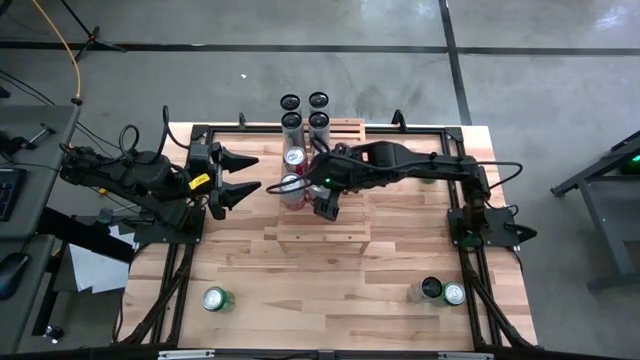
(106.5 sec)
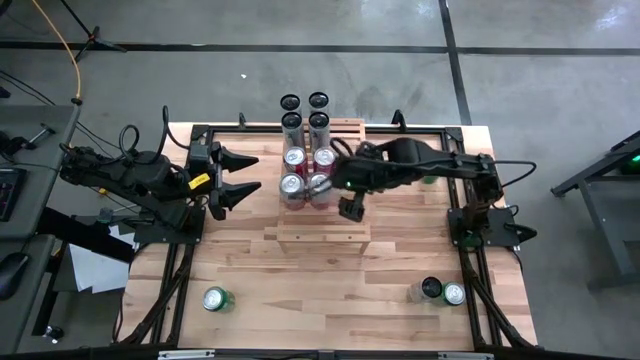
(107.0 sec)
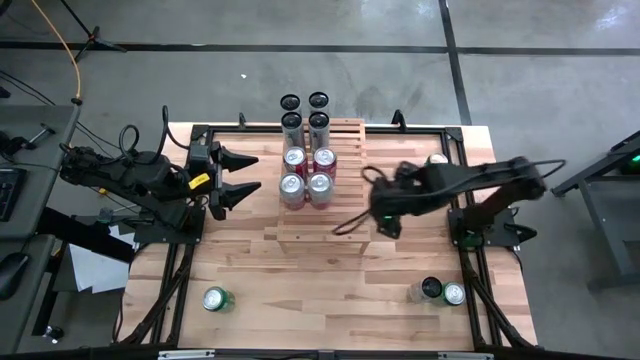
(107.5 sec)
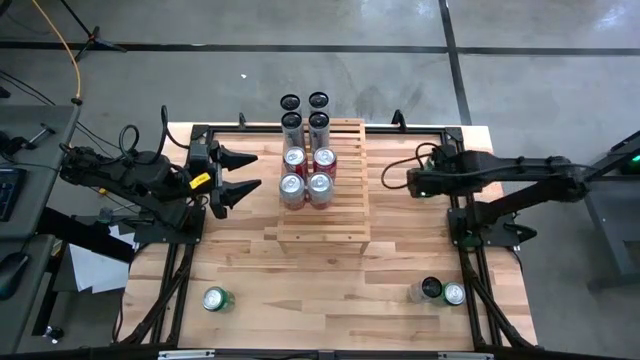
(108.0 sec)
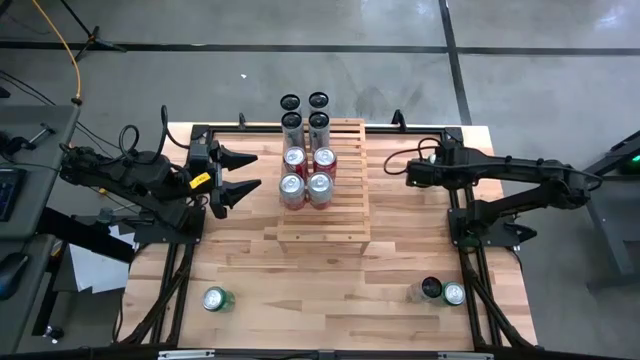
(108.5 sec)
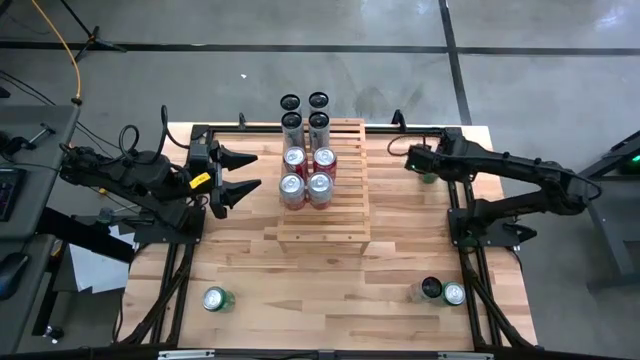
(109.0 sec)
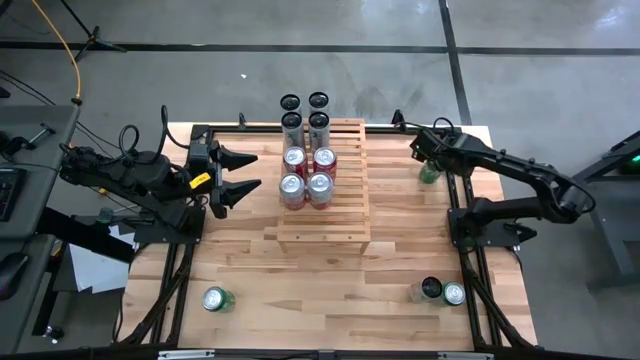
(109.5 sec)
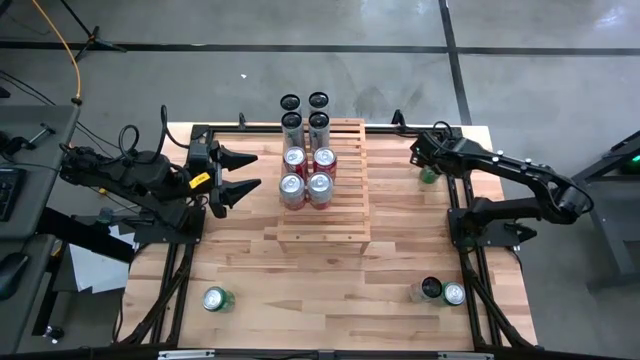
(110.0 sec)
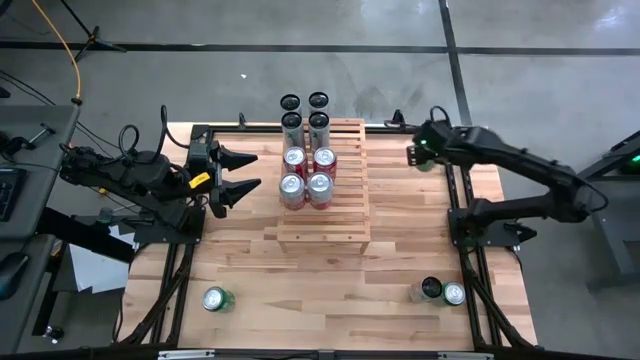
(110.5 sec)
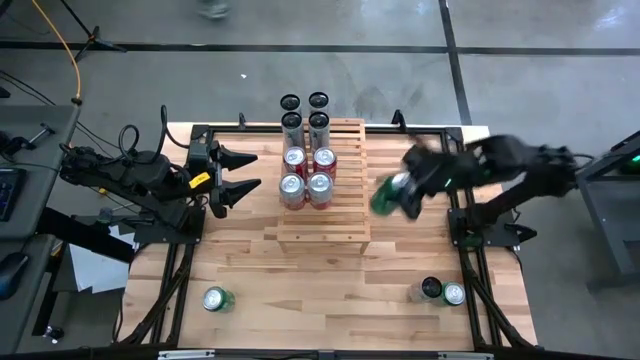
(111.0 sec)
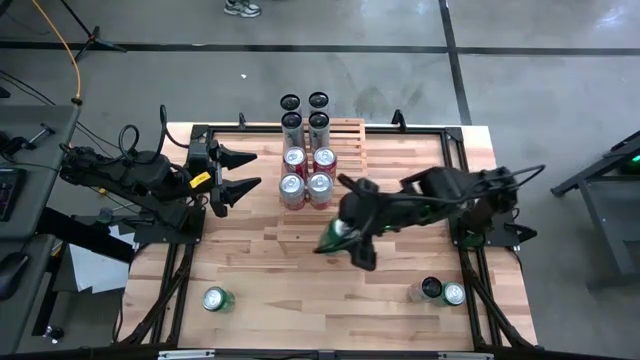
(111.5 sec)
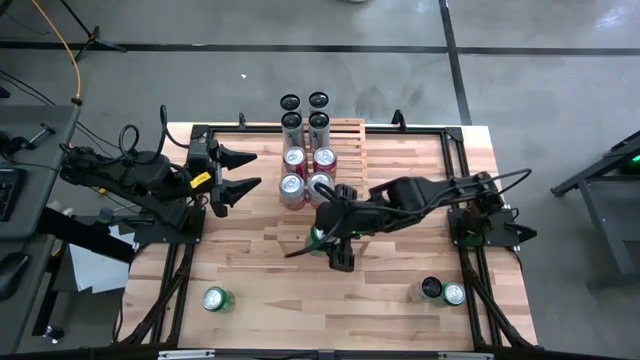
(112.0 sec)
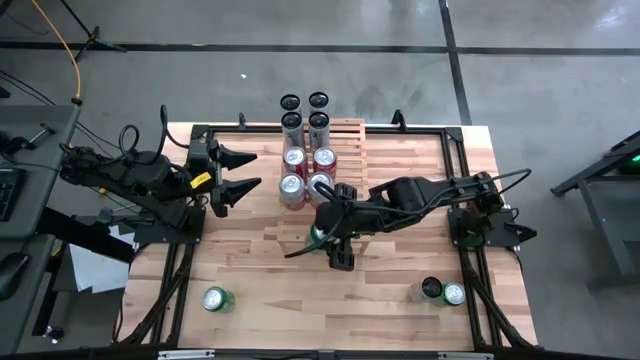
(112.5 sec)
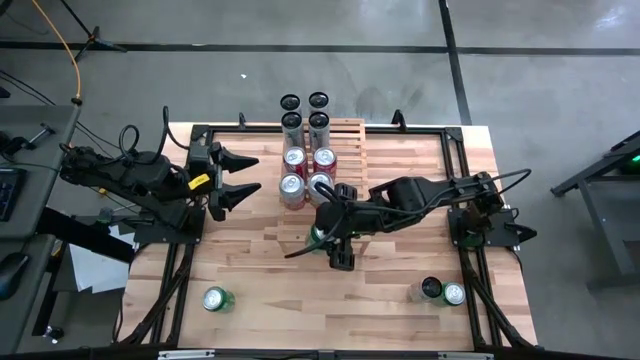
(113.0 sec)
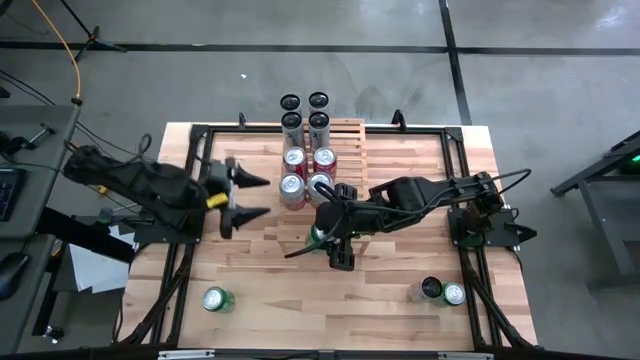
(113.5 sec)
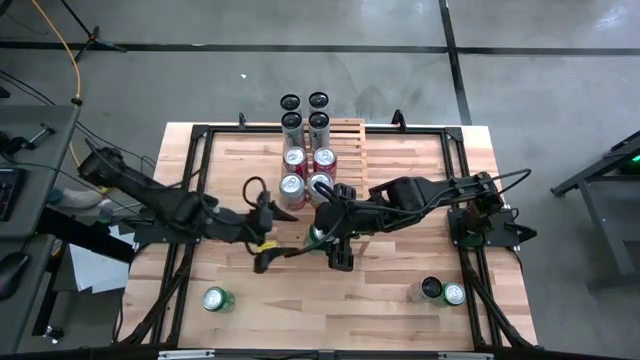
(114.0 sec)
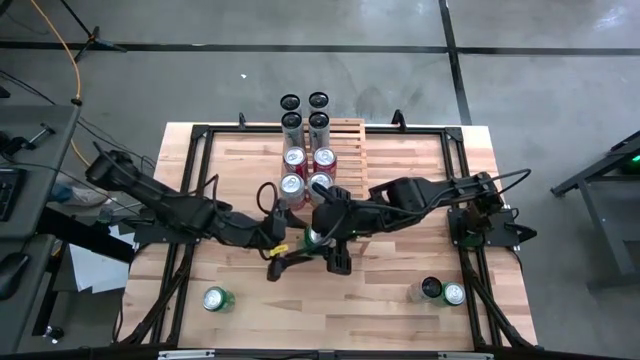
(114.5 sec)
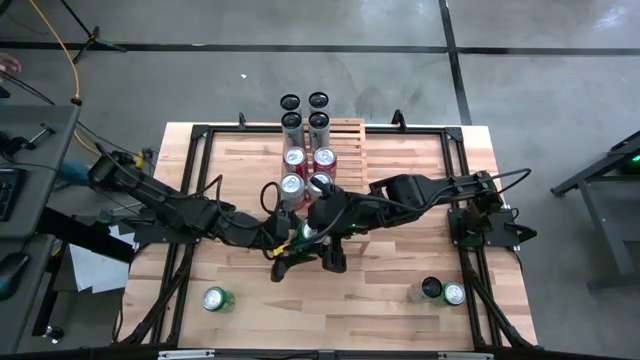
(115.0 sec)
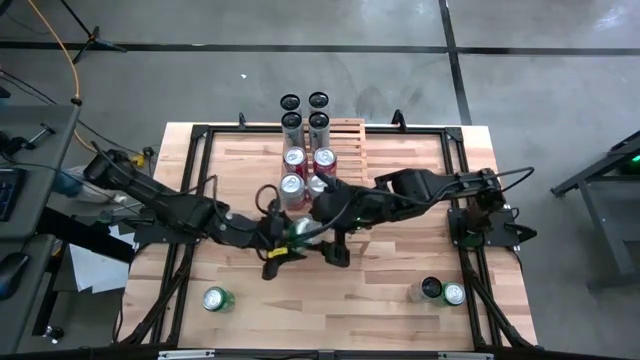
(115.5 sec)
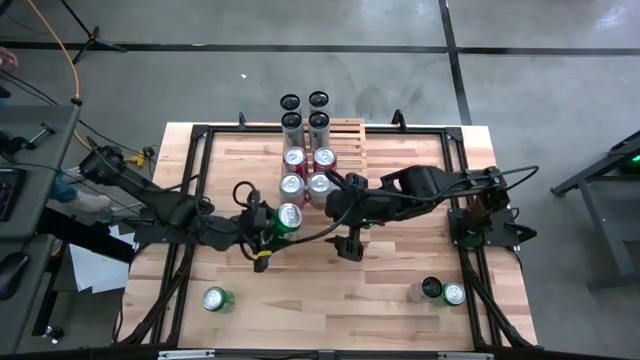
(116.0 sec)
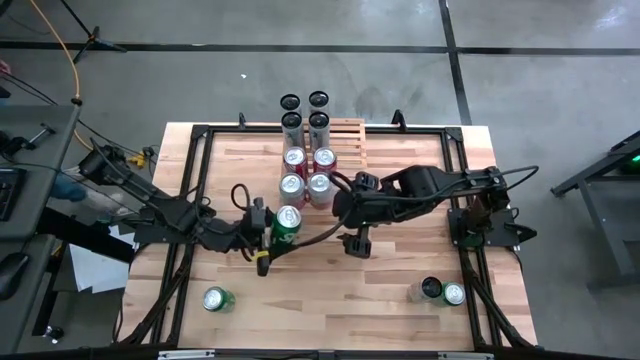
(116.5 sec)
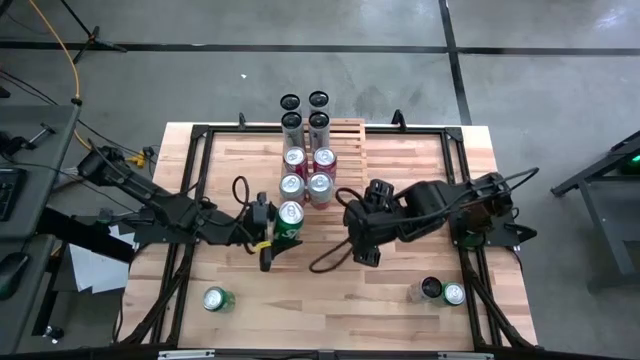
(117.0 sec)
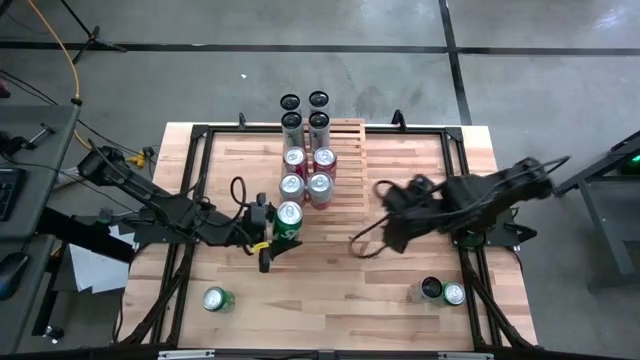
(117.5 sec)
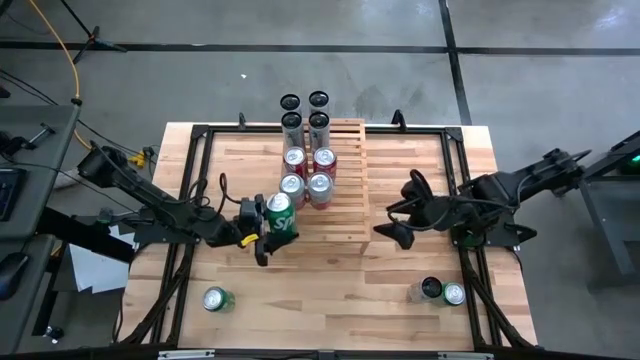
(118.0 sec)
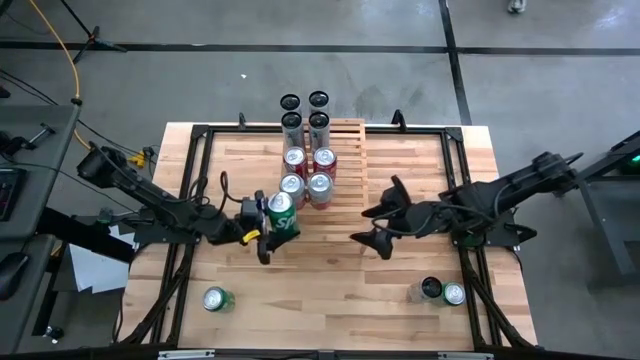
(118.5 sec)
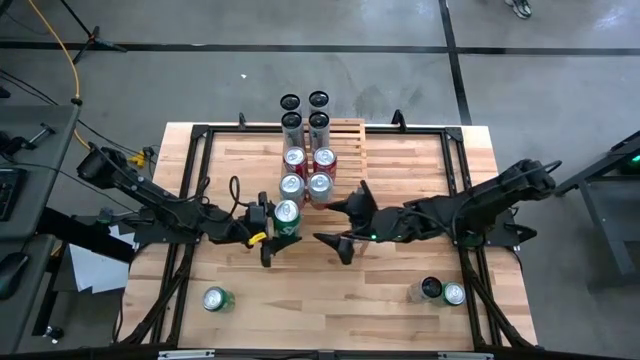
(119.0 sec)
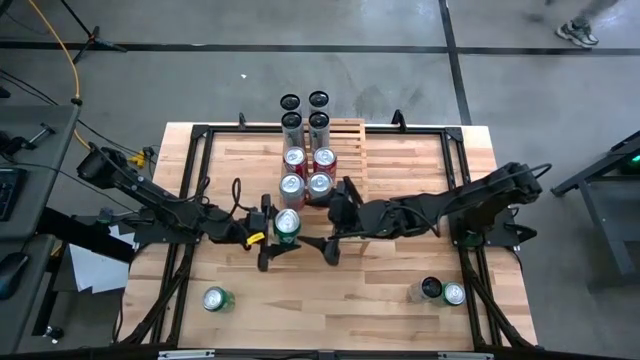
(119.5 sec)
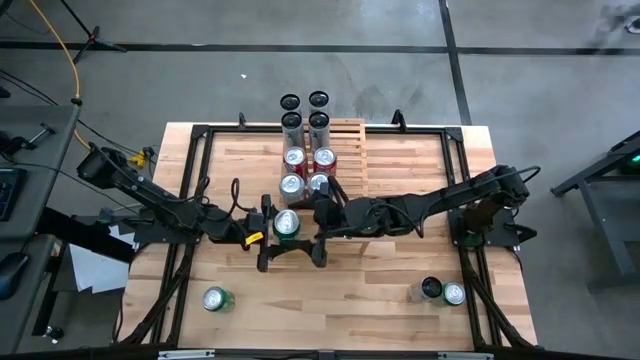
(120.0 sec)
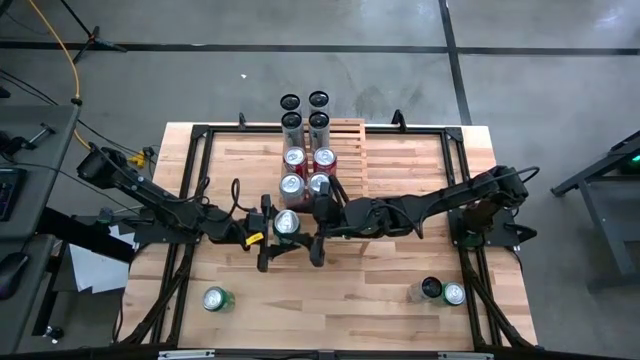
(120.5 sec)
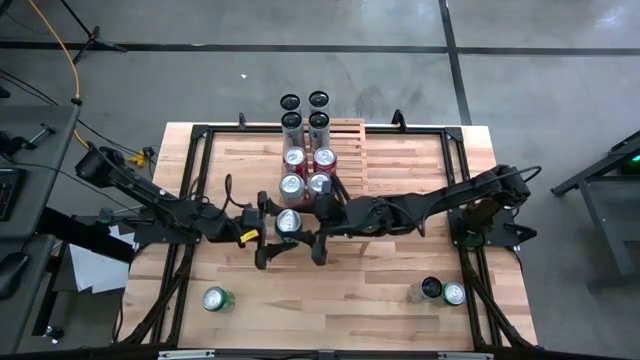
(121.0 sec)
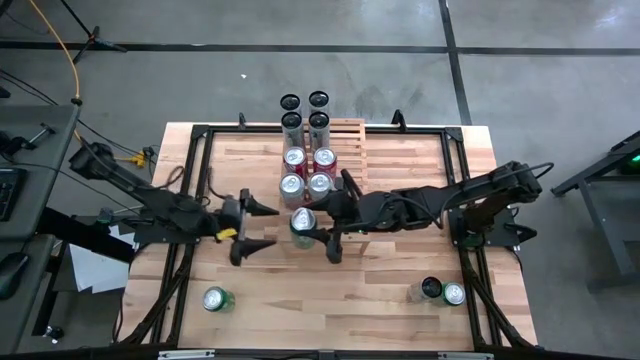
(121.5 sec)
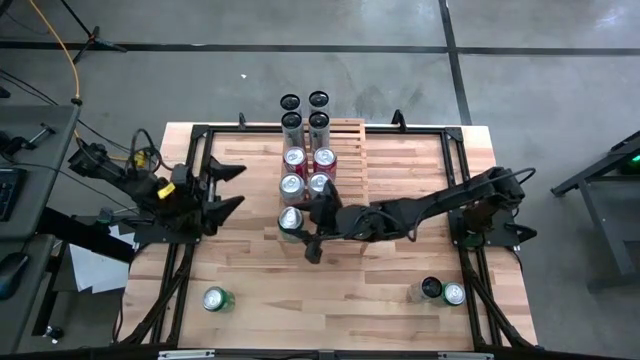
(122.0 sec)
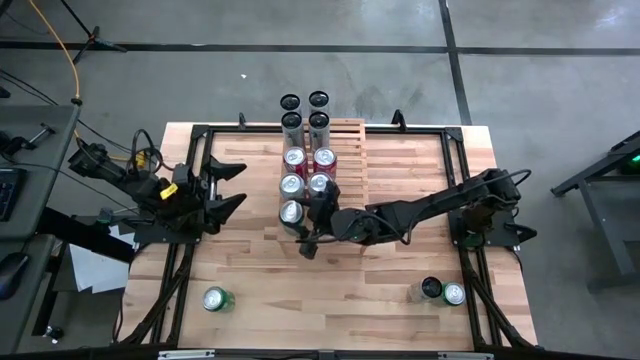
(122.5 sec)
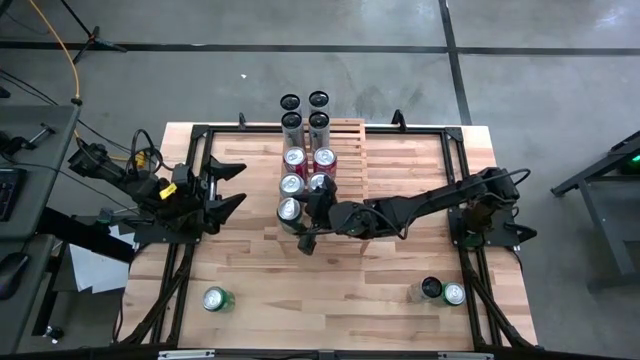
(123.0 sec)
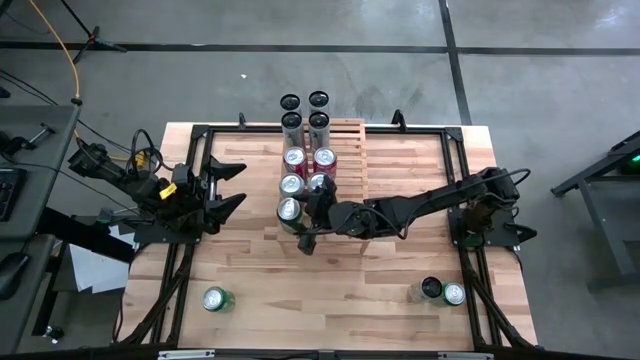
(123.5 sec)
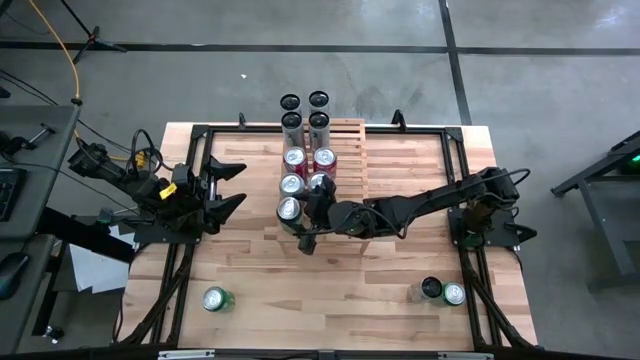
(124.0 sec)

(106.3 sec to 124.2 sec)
Task: Place canned beverage on shelf
Put the top green soda can on the shelf

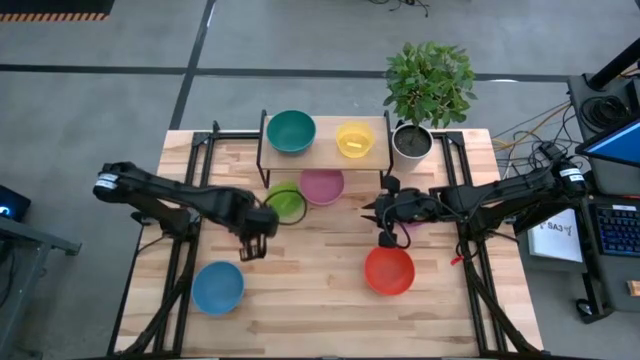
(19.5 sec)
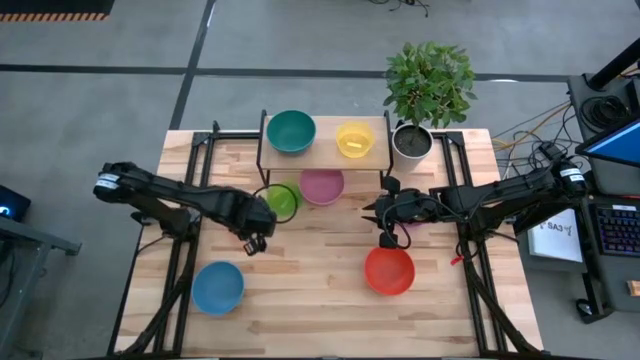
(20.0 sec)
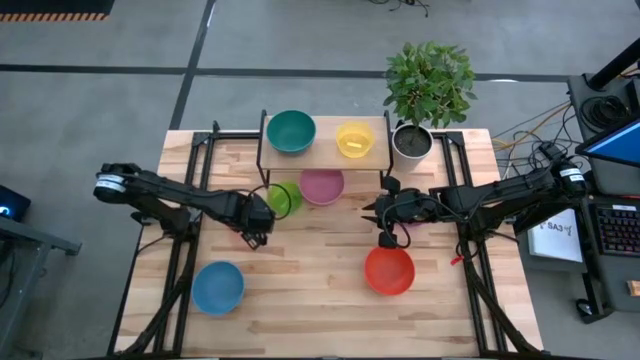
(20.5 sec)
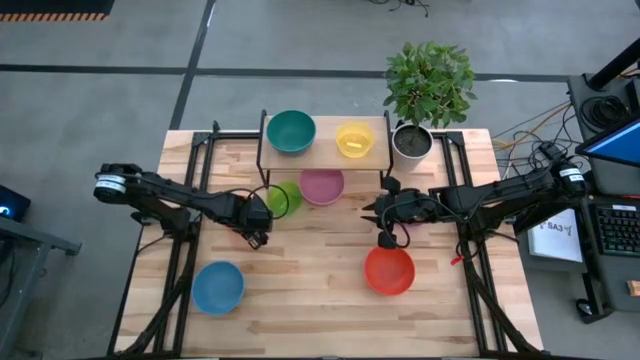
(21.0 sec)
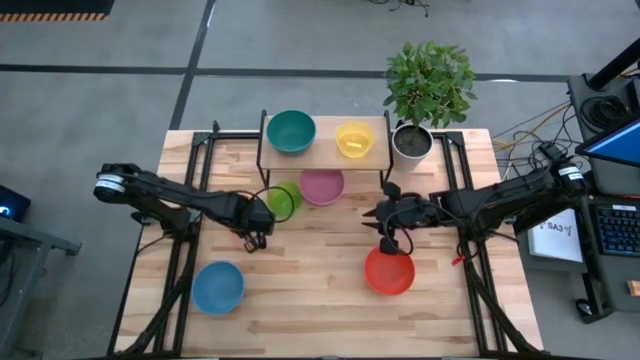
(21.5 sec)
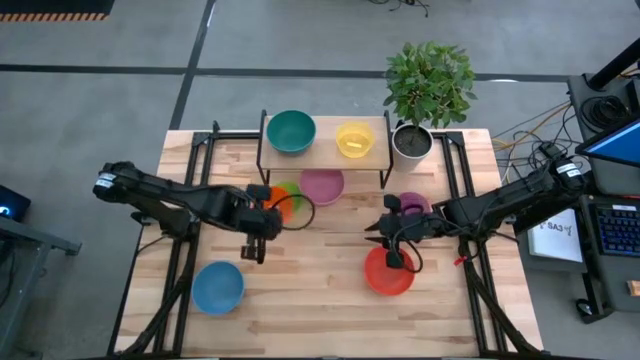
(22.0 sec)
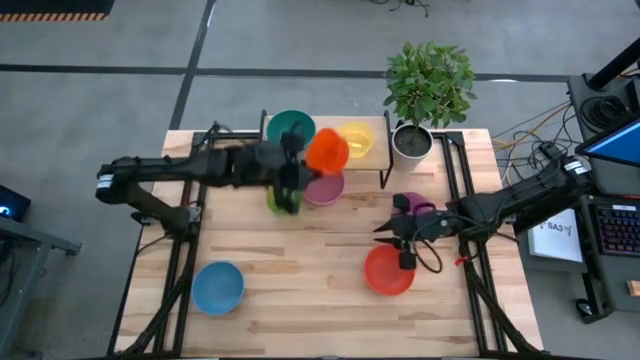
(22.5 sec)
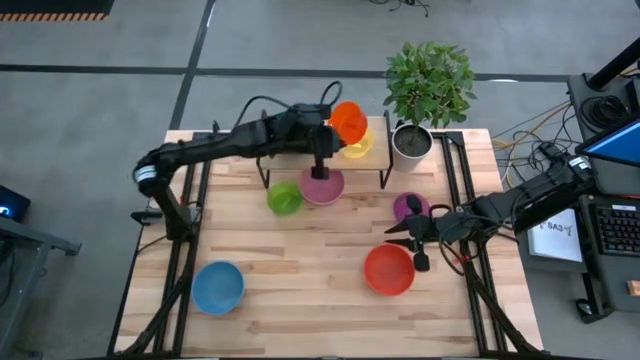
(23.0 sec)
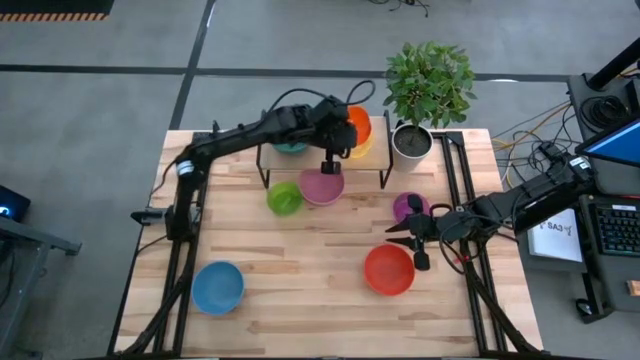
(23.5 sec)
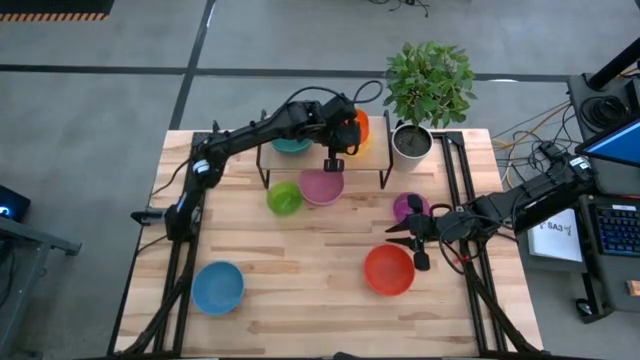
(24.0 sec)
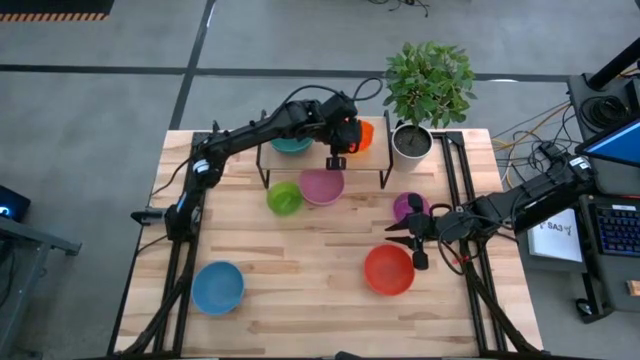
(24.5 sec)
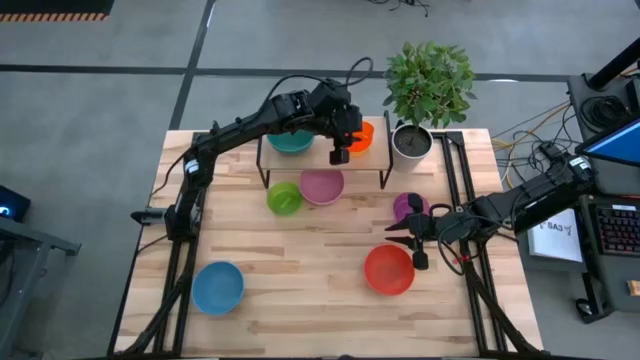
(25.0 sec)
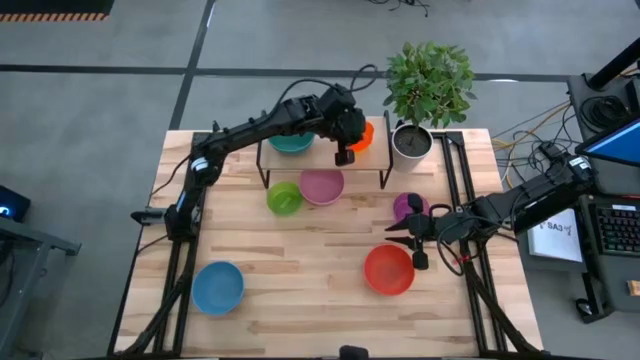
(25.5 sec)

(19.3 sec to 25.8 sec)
Task: Place and stack bowls onto a shelf
Stack the orange bowl on the yellow bowl on the shelf
